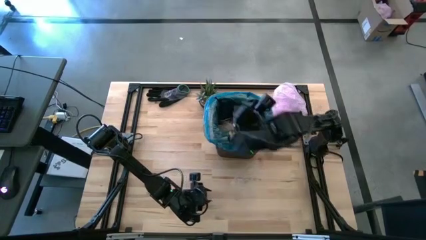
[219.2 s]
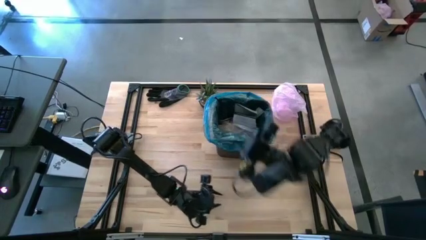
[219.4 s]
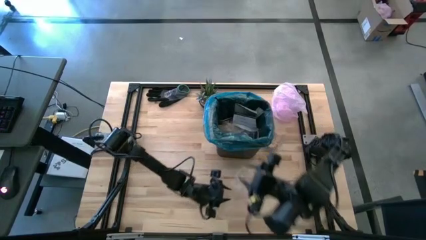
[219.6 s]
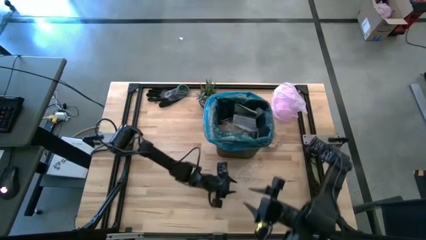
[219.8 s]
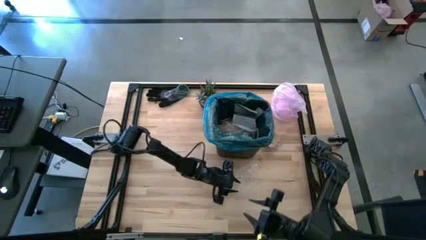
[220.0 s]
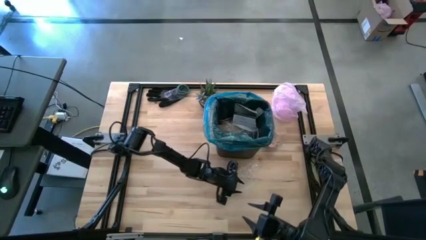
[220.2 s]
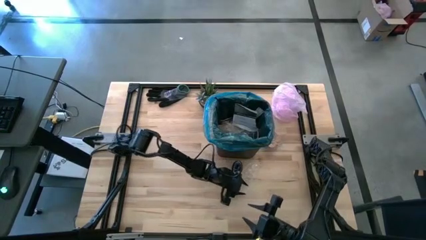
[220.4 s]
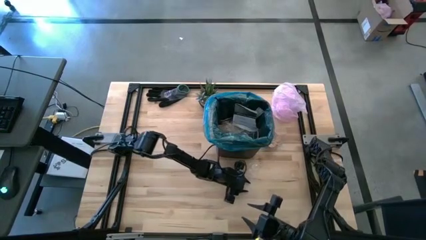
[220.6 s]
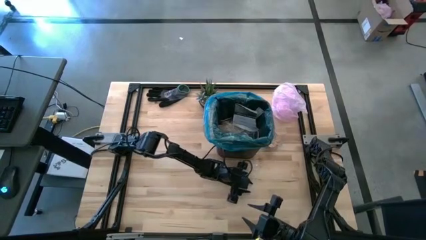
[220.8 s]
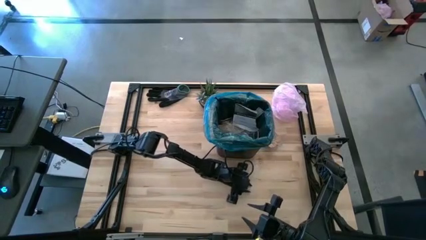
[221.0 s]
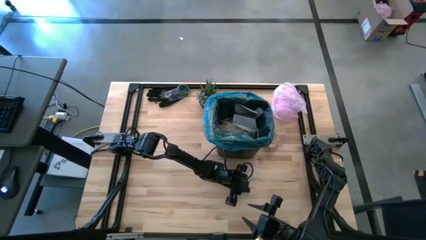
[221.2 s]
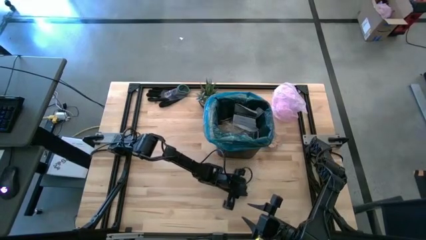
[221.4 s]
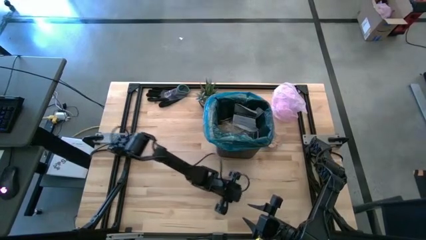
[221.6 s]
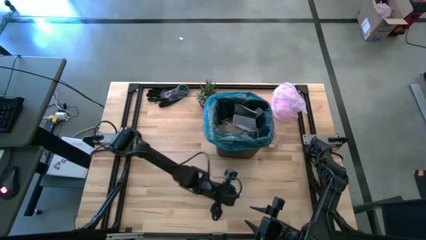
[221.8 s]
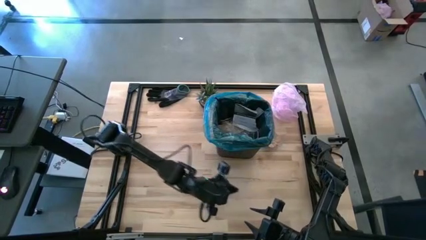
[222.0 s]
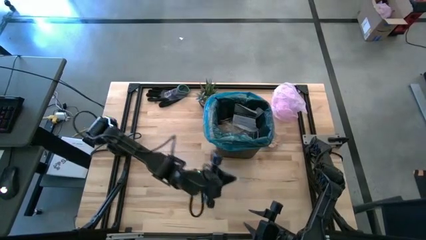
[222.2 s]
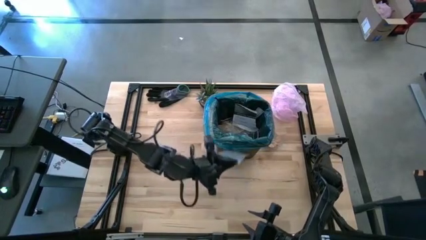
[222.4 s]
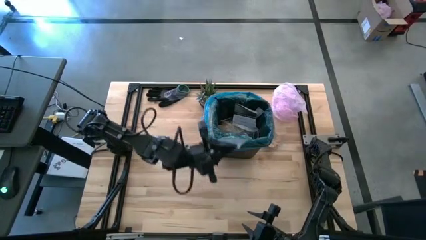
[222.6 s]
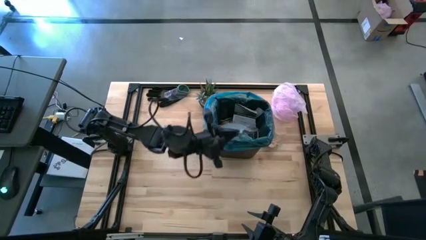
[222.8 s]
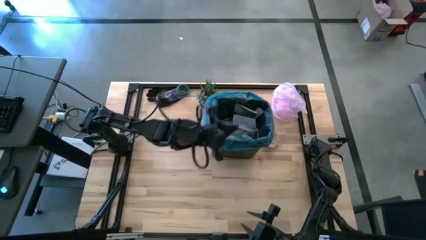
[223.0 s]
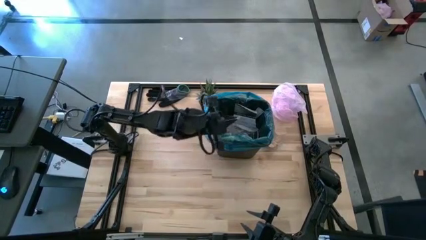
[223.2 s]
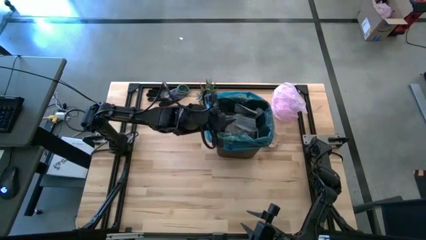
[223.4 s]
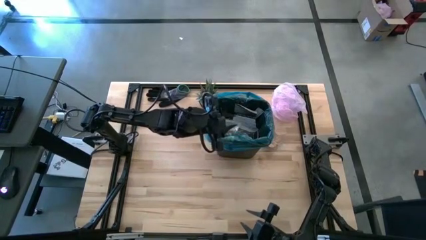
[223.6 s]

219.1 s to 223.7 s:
Task: place trash/remove bag and relplace
Put the transparent plastic into the trash bin

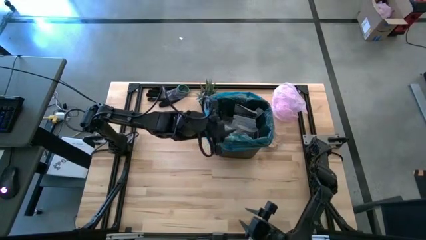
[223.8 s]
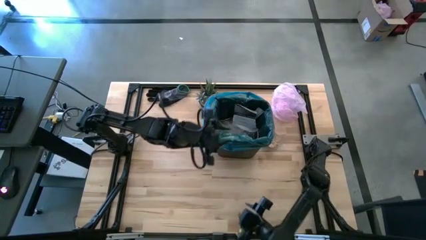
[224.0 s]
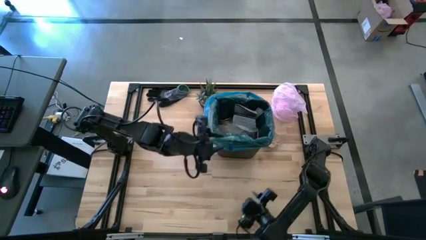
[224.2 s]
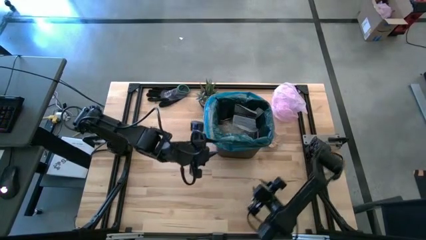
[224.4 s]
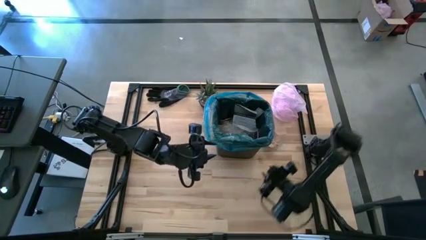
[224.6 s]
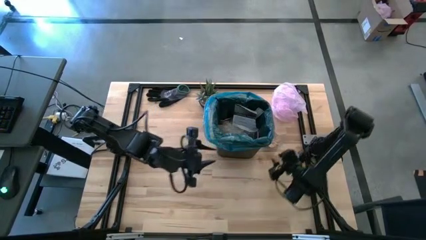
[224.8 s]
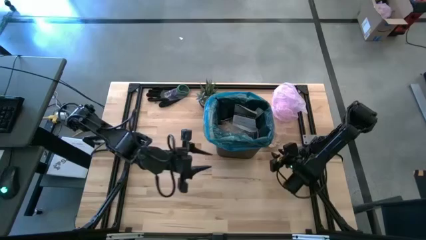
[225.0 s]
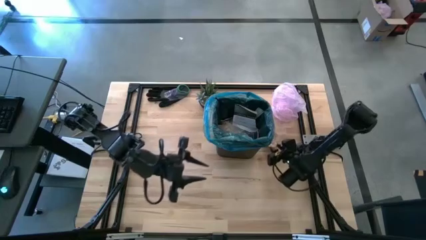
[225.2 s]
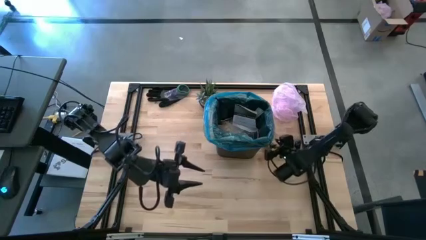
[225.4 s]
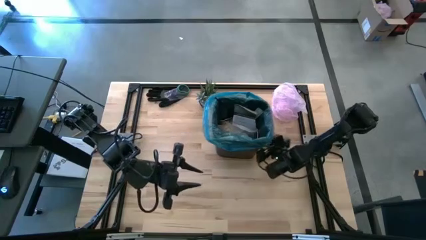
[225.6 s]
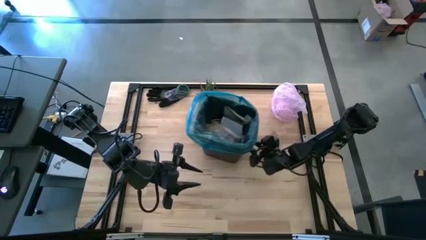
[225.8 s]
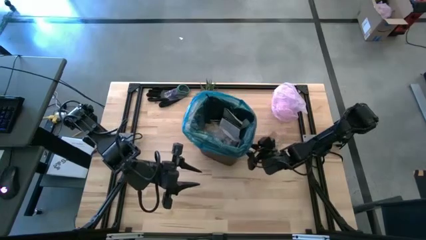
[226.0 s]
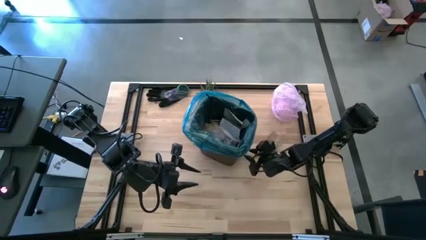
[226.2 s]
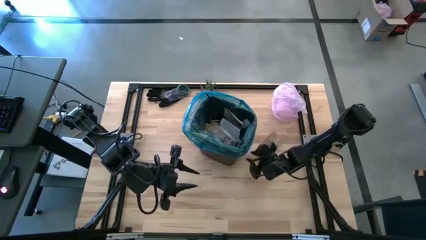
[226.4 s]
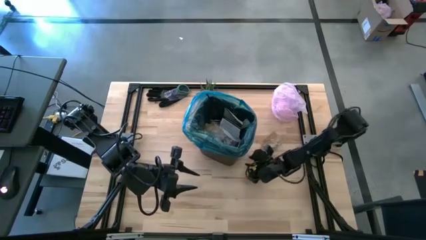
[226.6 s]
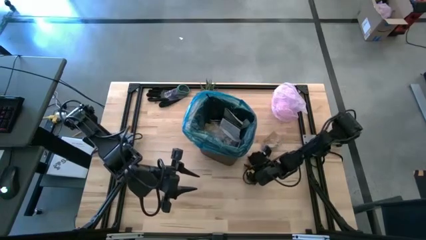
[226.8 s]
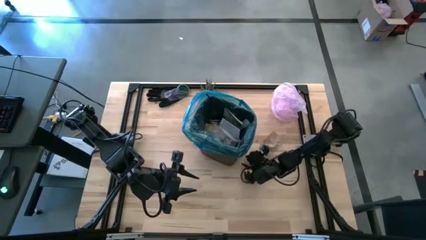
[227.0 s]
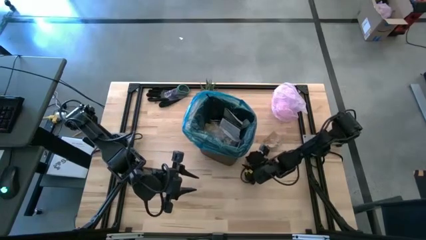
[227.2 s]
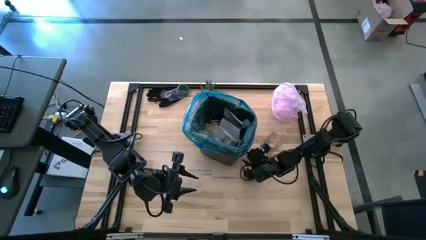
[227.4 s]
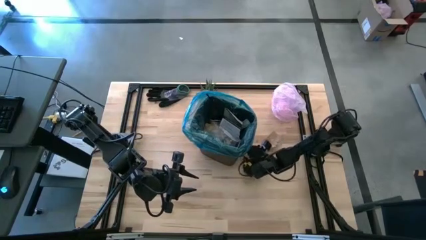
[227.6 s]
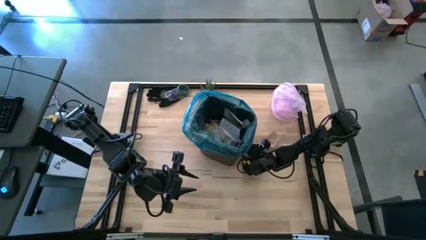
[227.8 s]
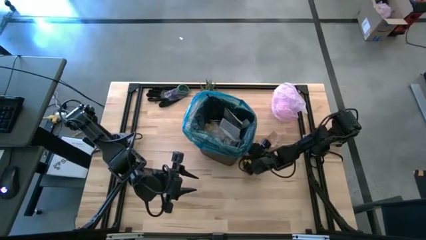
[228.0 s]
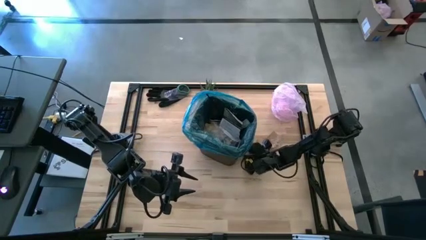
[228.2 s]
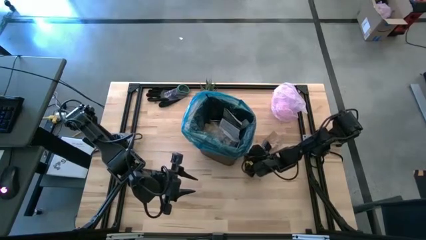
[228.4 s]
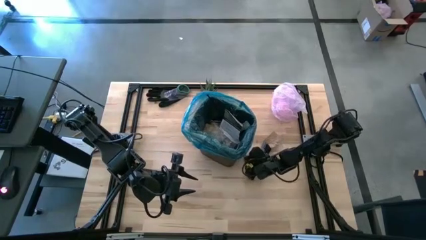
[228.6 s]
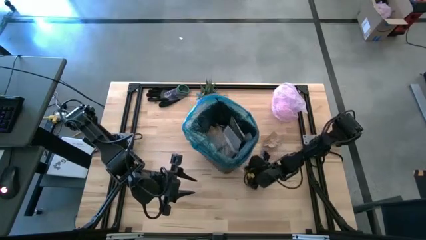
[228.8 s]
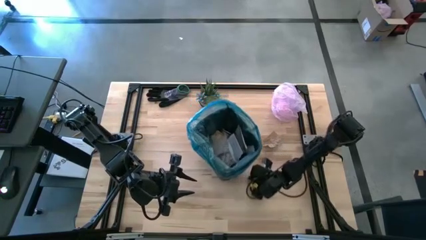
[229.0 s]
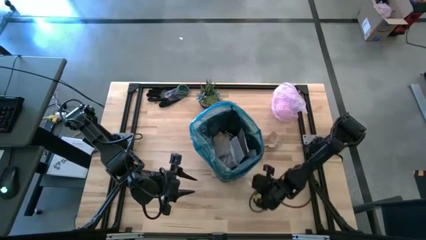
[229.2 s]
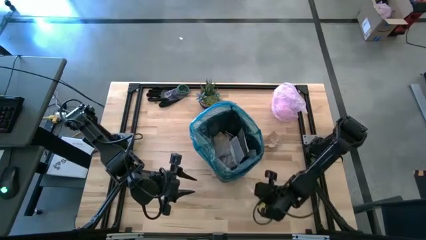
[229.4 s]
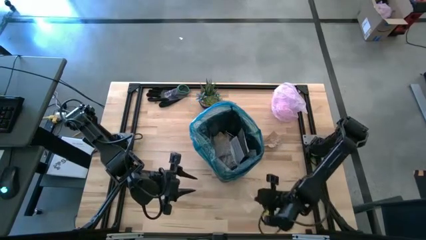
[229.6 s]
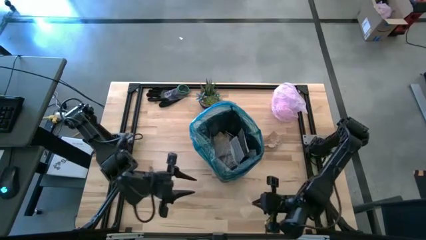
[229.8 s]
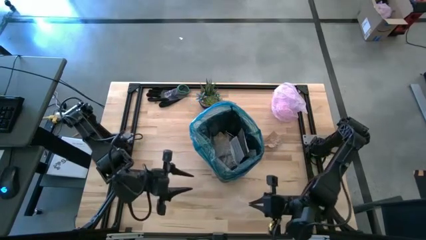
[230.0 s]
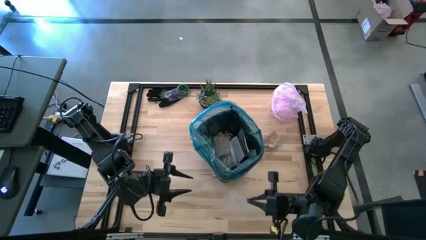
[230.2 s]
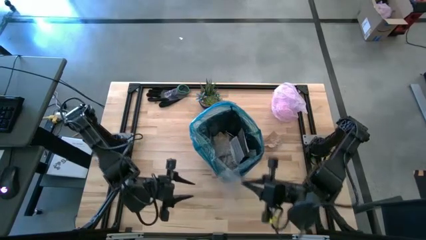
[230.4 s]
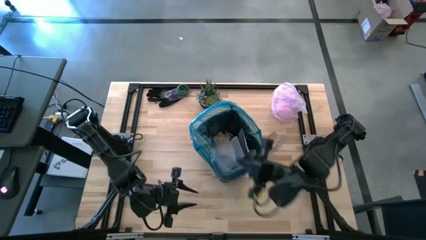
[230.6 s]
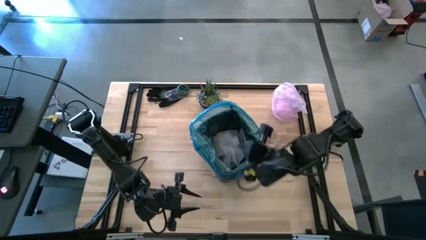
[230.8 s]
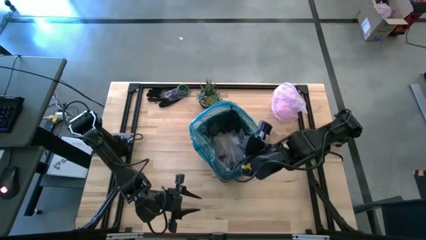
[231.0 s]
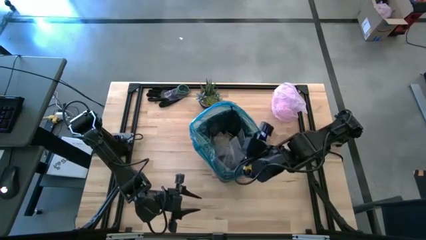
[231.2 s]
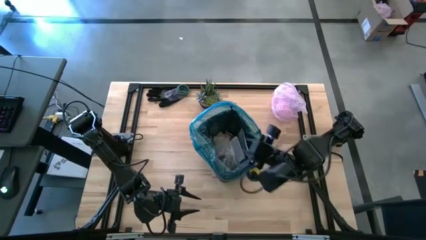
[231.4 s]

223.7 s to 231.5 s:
Put the transparent plastic into the trash bin

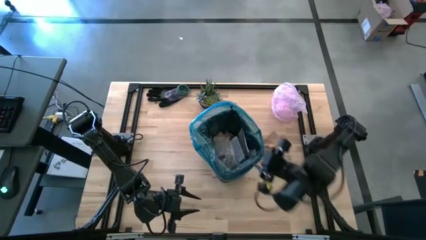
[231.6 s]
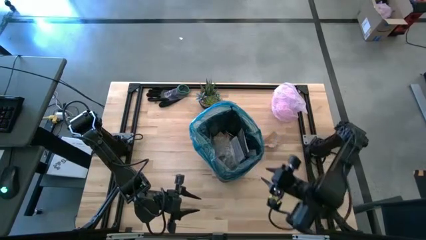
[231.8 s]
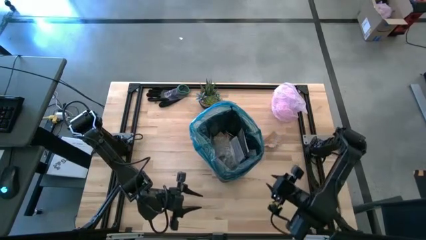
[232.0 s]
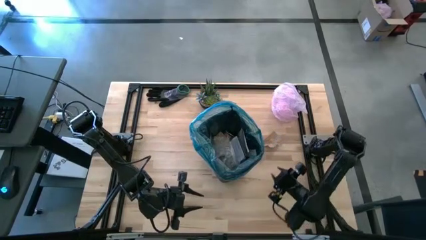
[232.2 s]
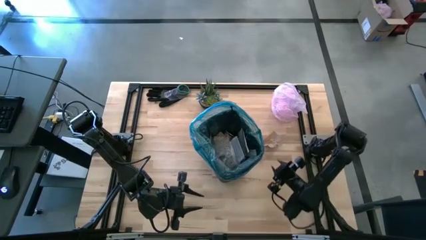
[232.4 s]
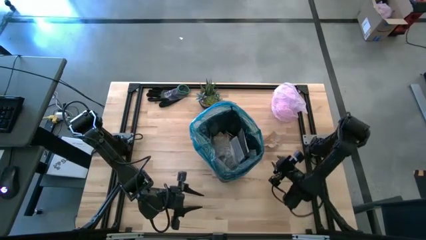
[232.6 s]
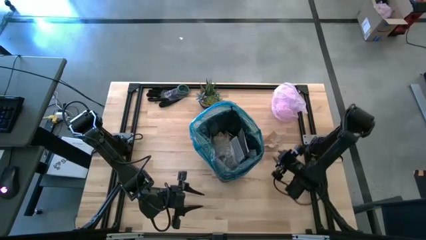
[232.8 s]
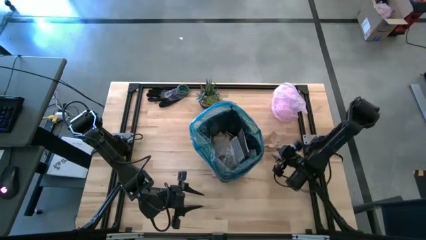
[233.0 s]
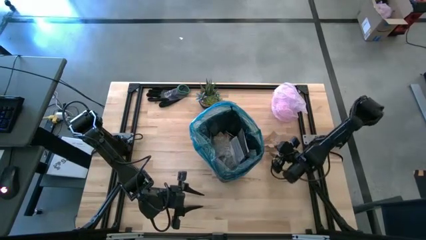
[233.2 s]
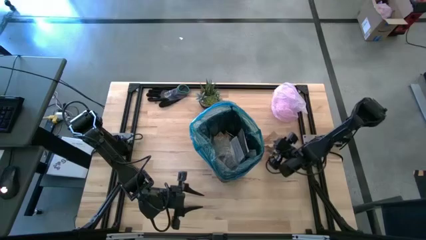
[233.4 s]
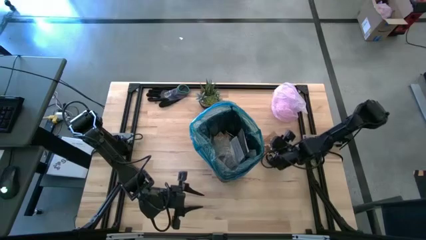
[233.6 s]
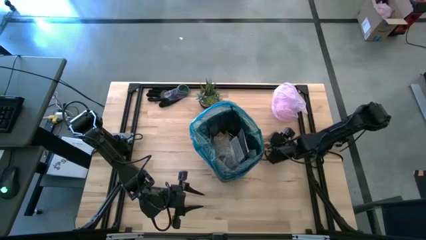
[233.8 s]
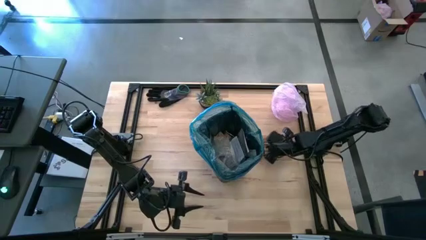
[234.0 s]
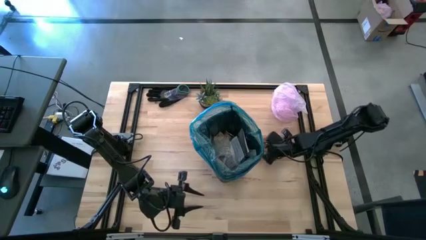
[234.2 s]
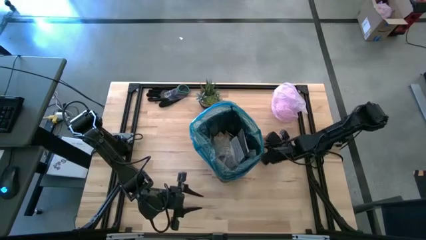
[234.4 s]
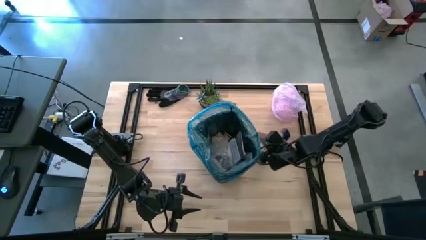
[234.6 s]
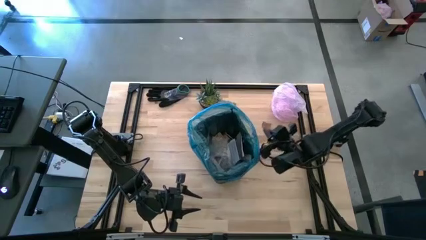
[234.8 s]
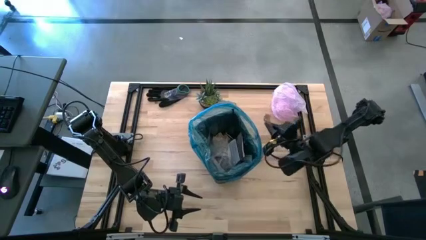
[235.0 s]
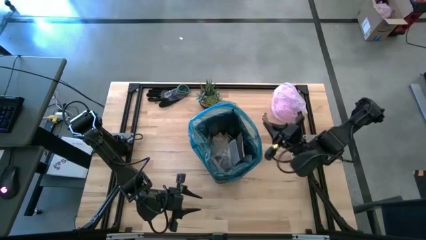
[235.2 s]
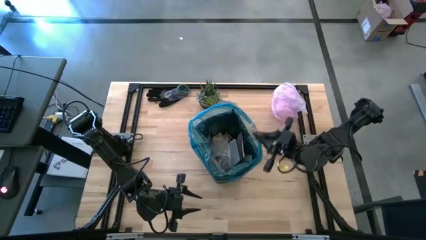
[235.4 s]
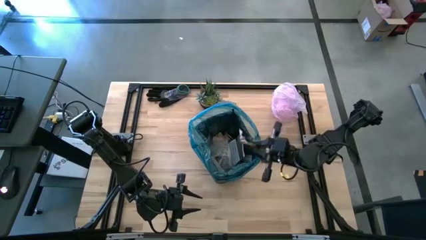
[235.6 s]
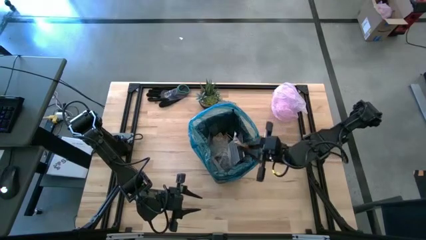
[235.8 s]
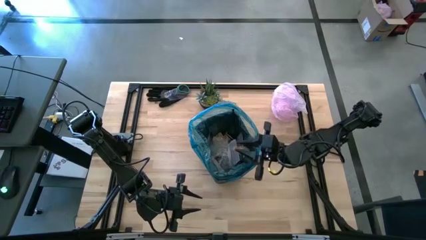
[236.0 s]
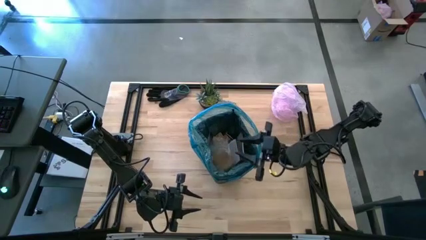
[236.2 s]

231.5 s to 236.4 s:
Put the brown napkin into the trash bin
